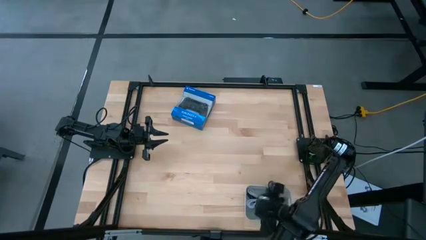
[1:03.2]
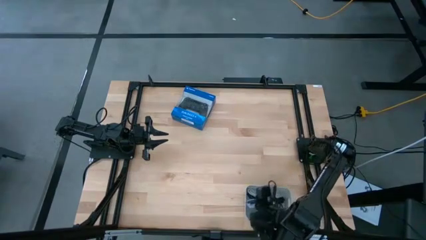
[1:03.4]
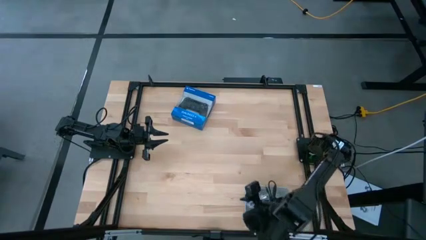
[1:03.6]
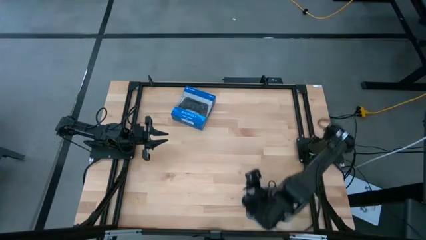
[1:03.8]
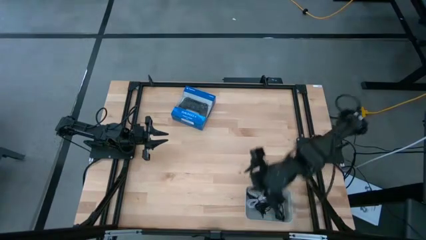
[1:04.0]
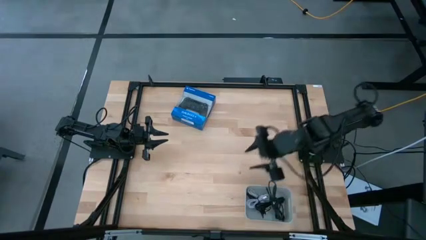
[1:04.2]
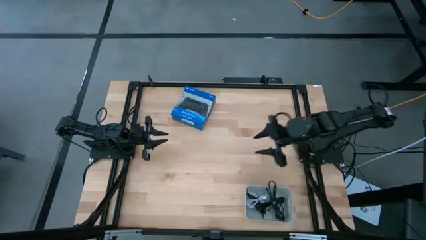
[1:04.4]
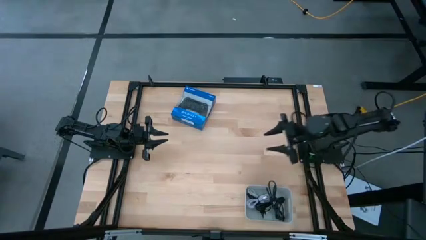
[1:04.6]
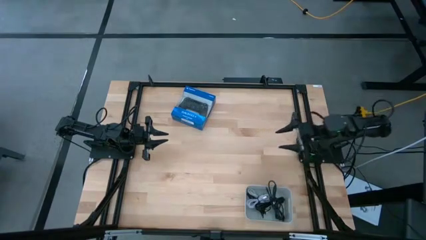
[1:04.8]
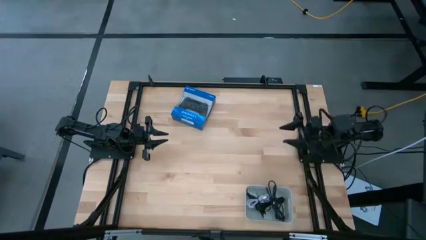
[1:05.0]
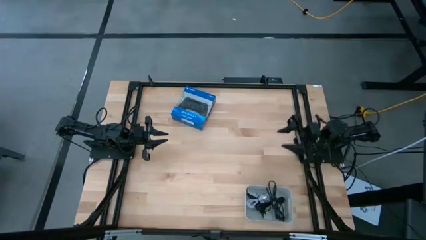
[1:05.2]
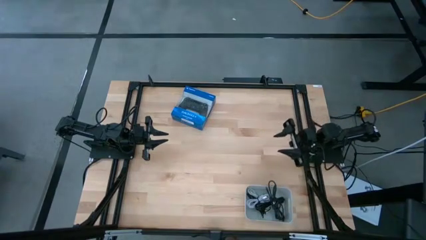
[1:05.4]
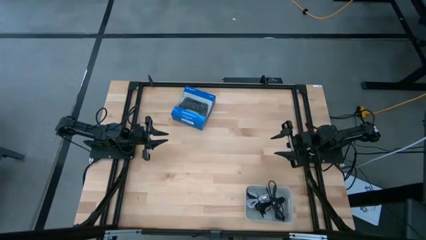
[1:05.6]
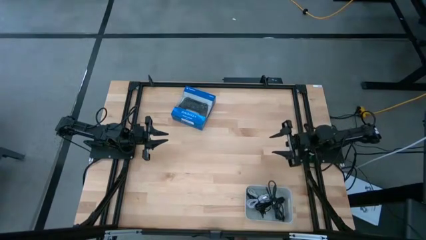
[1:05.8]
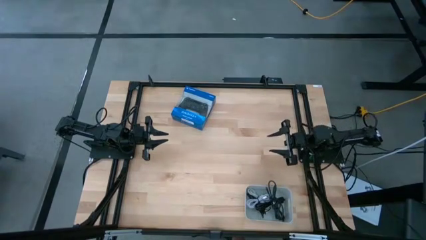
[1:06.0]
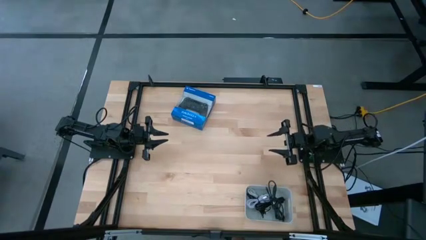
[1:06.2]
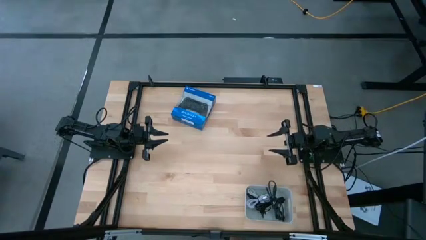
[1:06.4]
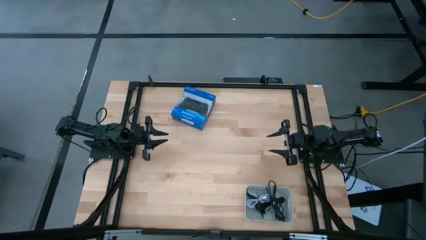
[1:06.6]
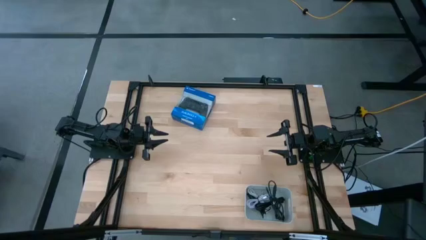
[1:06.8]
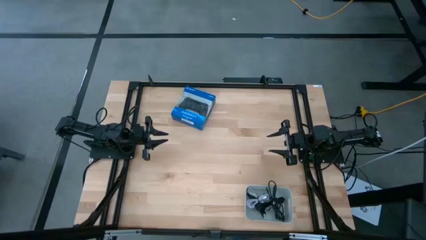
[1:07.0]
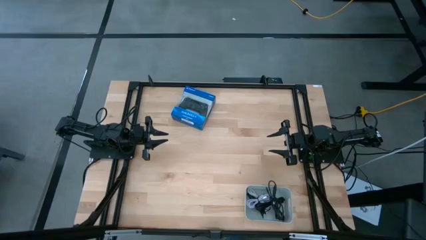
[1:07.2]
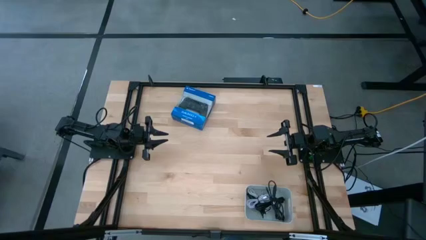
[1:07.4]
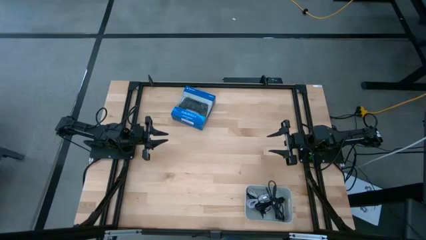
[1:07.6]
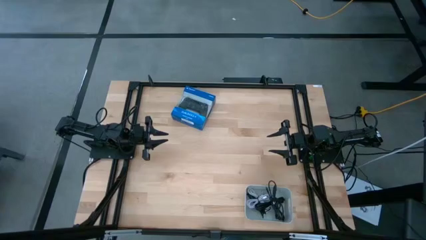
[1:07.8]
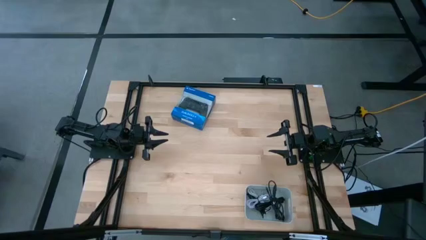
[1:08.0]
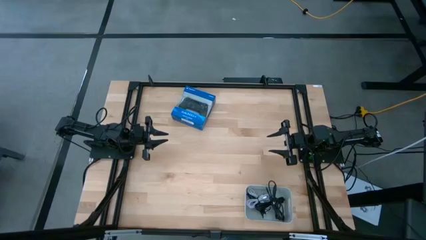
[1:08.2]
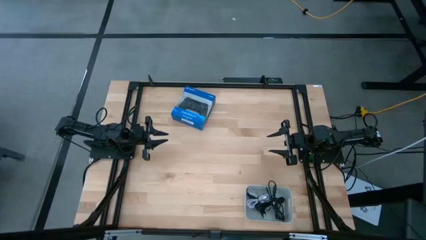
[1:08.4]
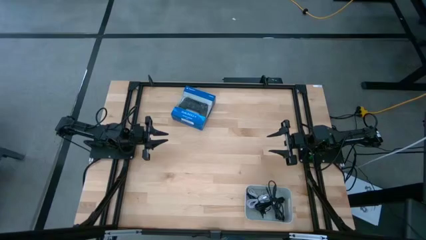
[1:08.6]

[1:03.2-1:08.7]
Task: Pick and place USB-C Cables
Return to Home Position

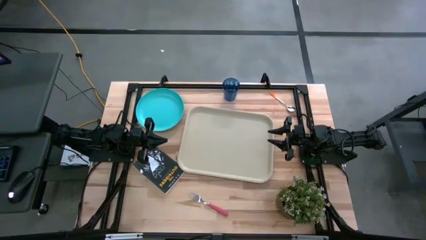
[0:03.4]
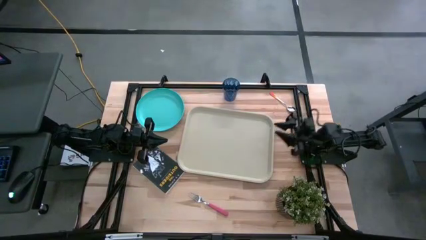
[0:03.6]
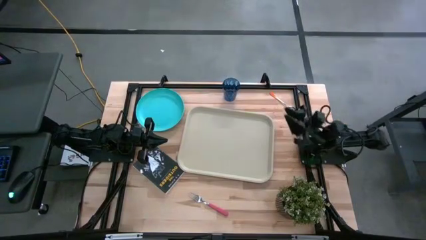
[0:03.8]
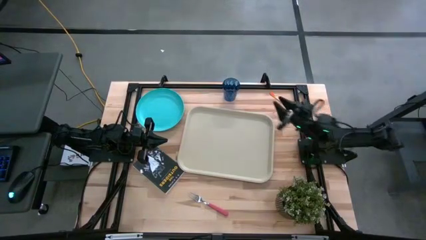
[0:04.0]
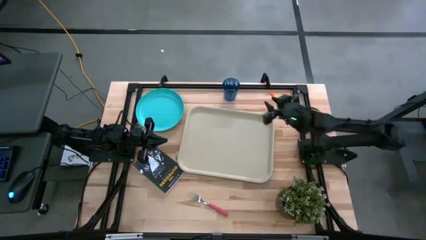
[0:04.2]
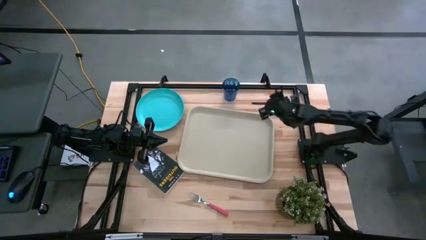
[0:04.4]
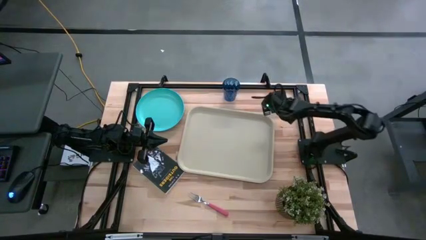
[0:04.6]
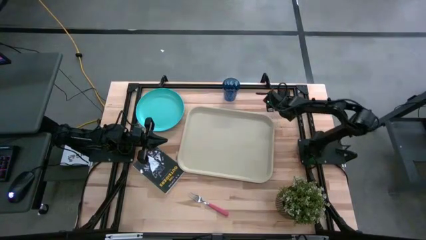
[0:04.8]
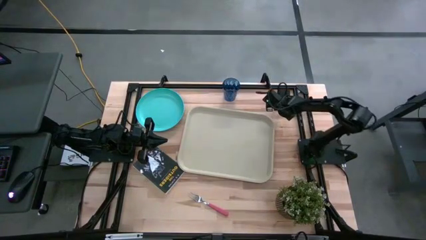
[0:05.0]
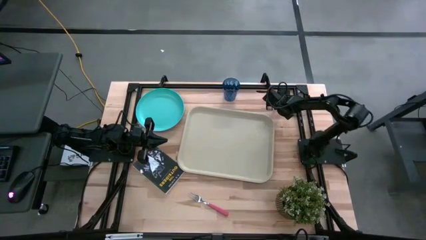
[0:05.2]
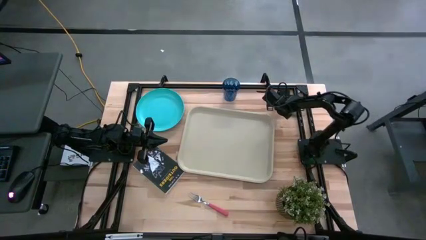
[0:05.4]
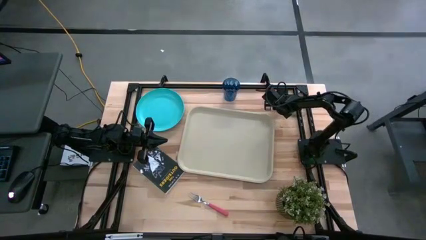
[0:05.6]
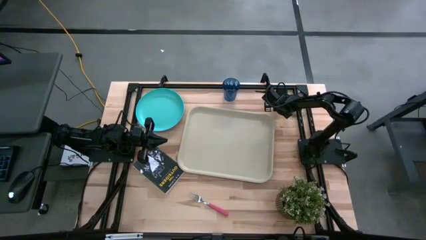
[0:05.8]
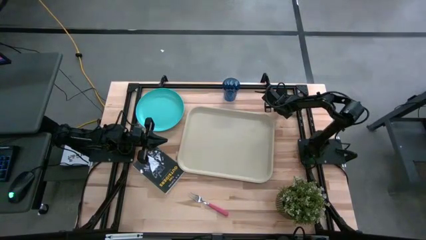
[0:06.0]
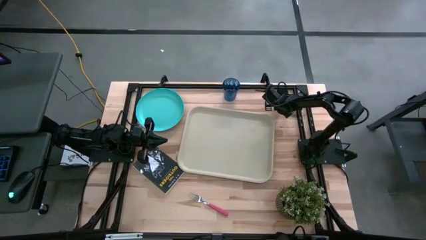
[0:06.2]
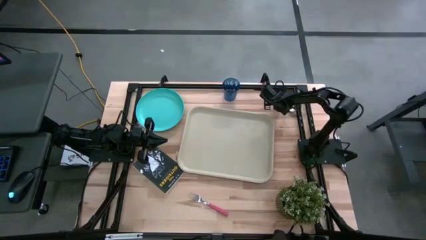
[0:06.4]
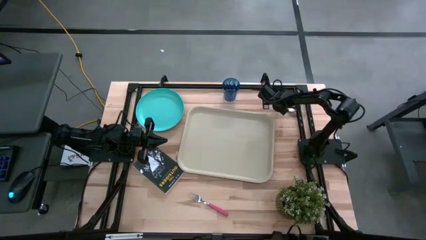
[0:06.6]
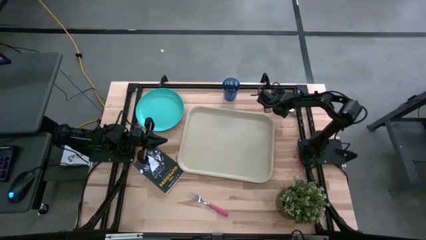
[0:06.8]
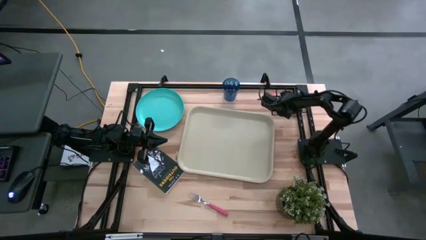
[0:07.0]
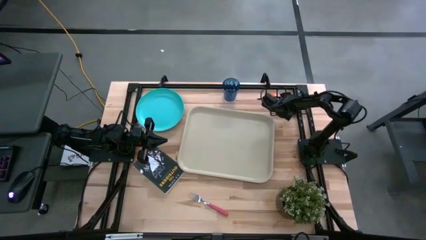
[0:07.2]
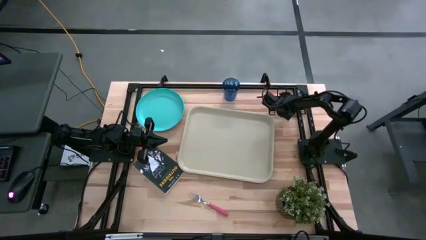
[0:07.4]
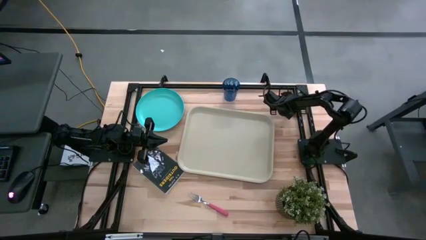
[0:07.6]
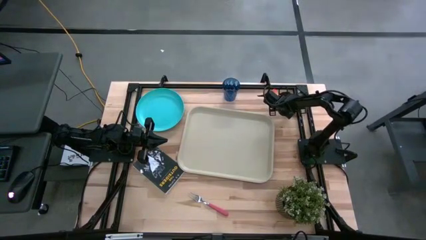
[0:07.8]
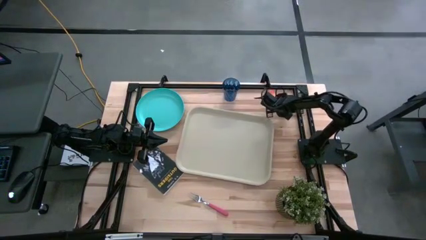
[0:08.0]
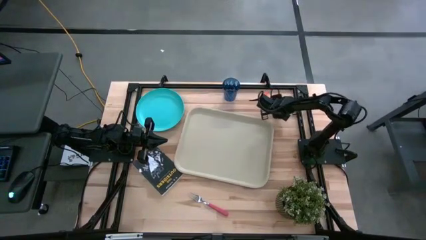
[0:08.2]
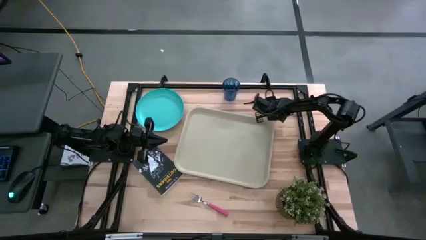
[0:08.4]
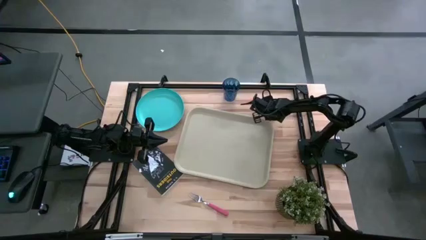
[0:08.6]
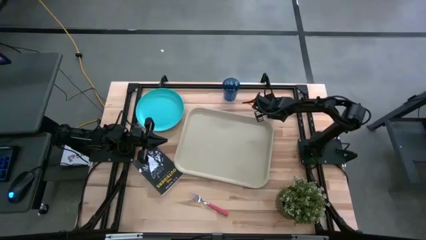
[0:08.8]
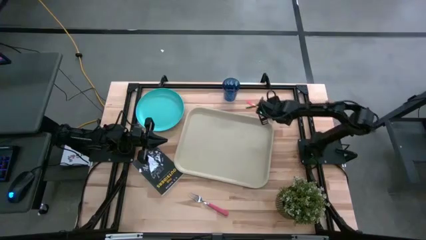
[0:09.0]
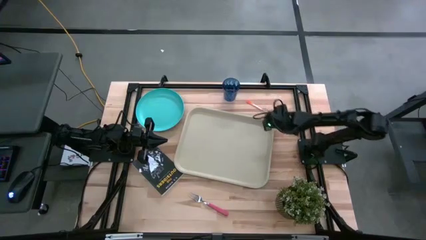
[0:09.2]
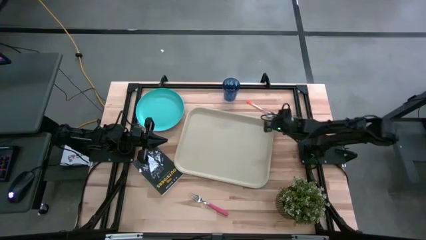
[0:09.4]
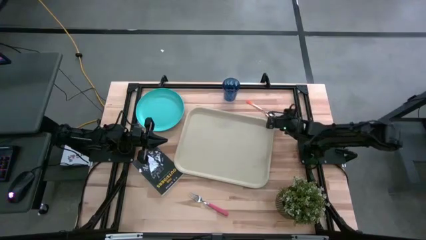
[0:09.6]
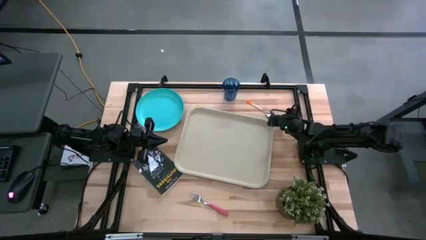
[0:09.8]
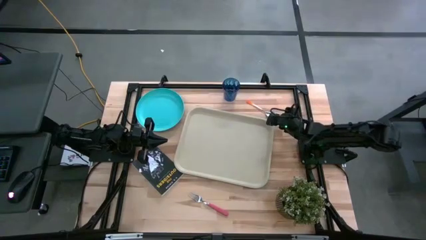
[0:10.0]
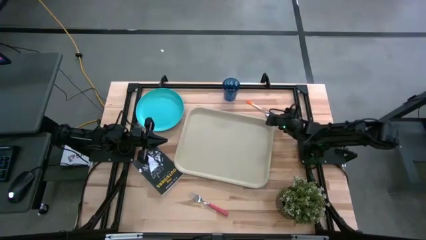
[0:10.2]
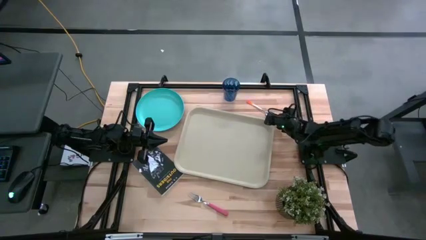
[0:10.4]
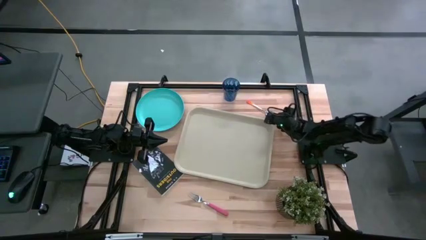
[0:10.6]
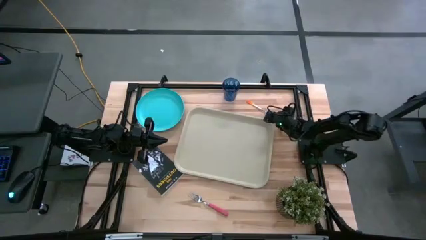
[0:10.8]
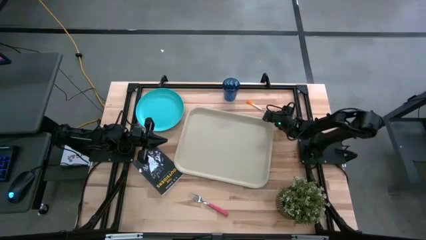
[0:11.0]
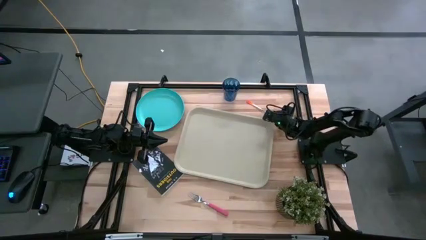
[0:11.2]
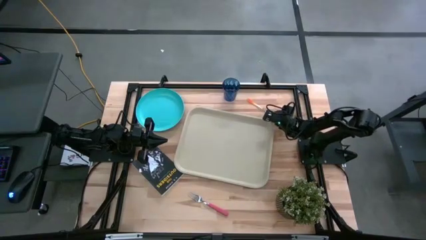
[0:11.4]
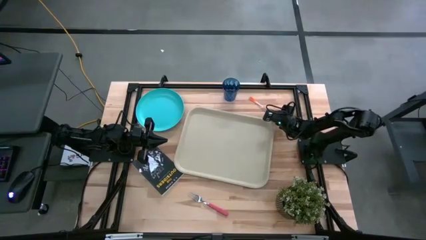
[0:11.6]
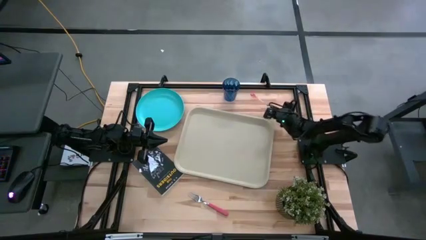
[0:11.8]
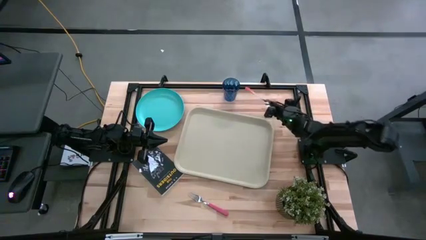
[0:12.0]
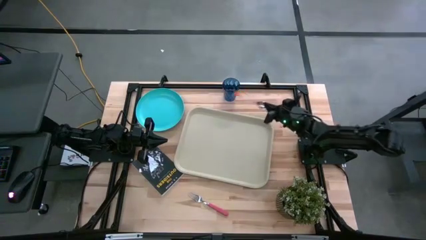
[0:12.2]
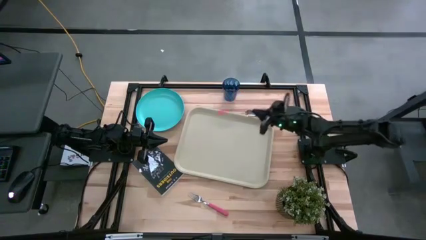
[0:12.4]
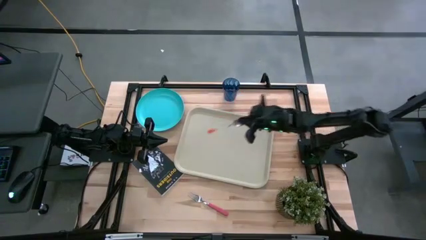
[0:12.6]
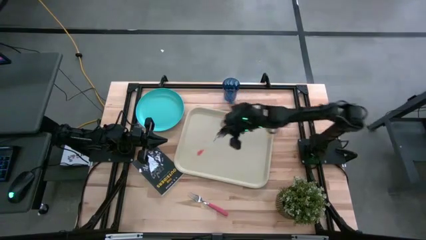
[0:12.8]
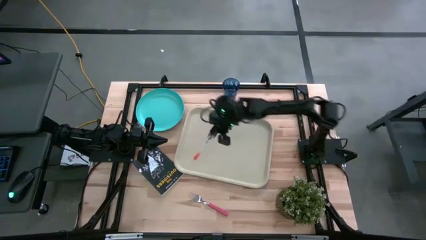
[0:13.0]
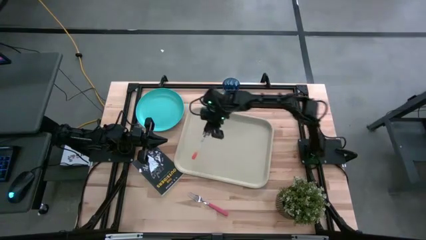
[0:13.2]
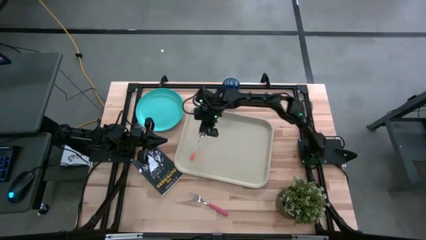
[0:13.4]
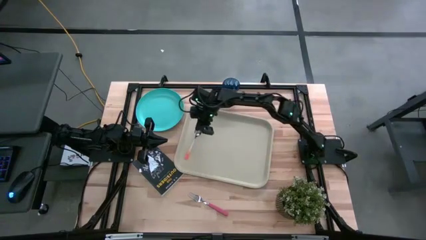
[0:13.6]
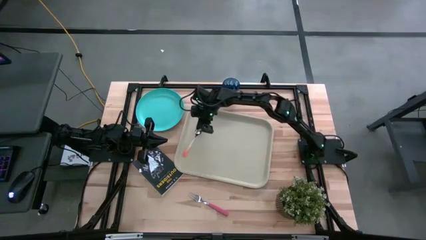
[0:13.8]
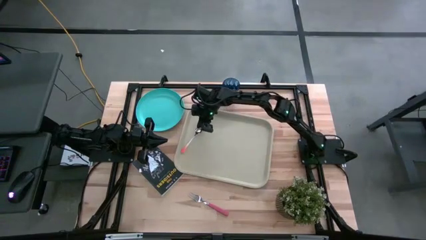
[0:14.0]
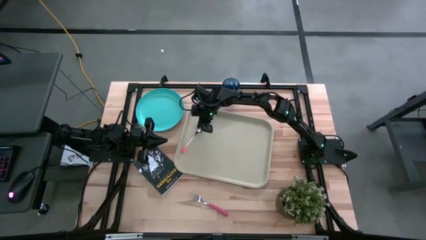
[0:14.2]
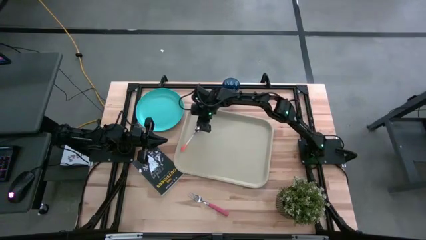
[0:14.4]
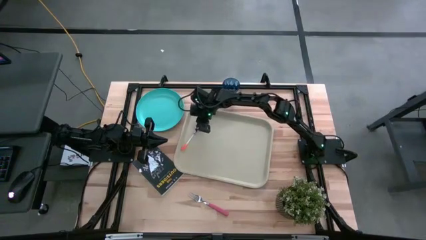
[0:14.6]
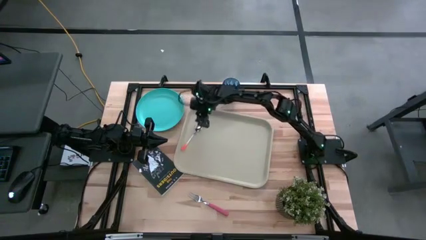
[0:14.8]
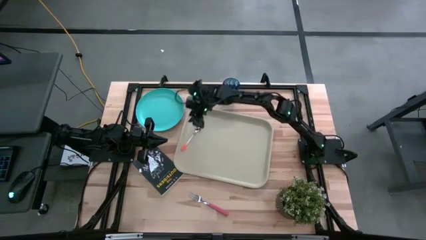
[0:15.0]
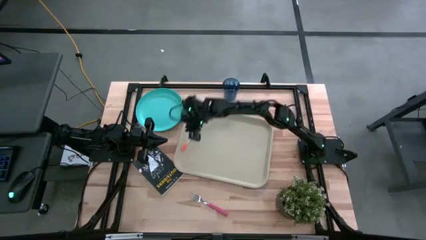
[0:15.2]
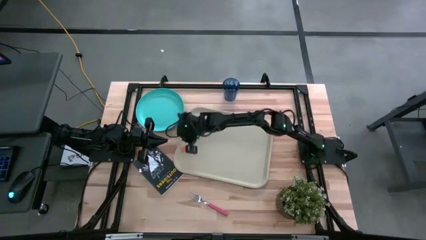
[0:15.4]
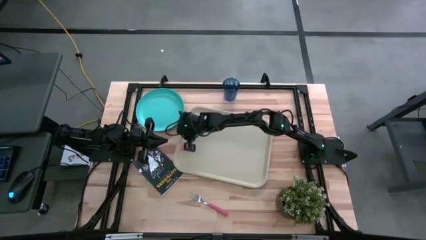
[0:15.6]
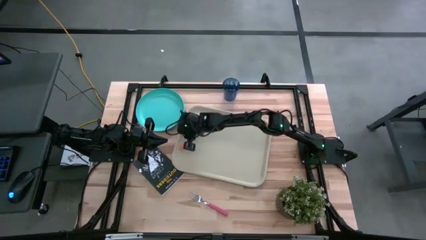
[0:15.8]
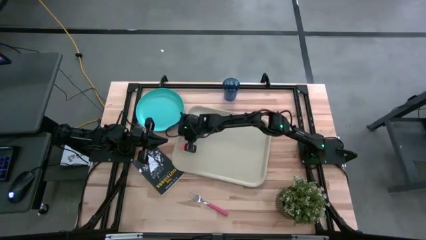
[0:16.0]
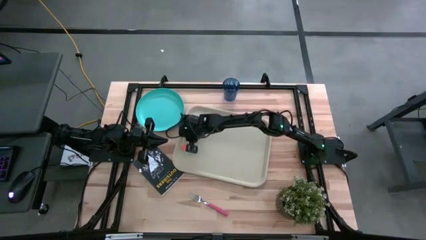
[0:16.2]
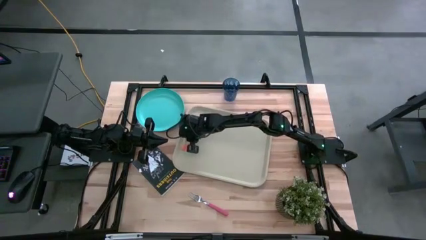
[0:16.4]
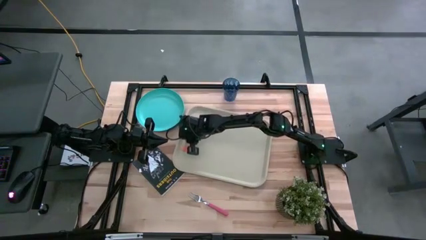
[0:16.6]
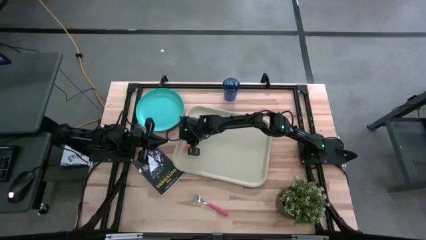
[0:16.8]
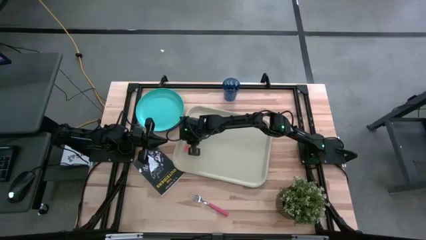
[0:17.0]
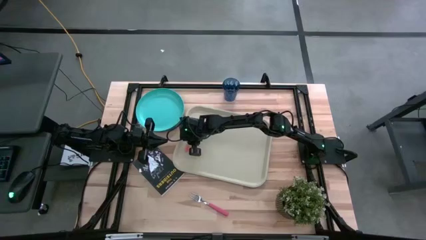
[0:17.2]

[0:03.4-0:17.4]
Task: Pick and place plate/cup/fork/spoon on tray
Put the white orange spoon on the left side of the gray tray
